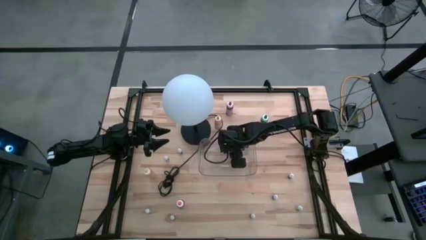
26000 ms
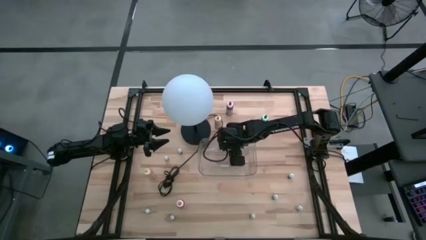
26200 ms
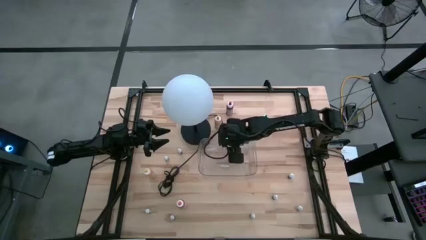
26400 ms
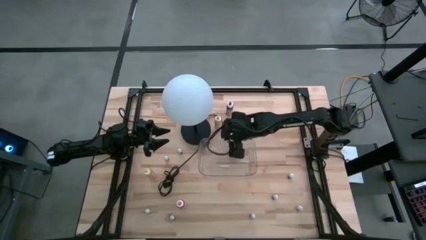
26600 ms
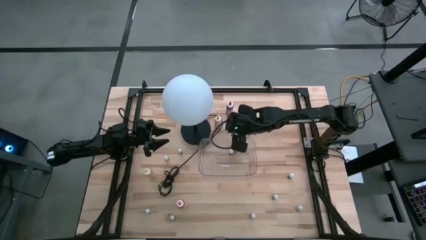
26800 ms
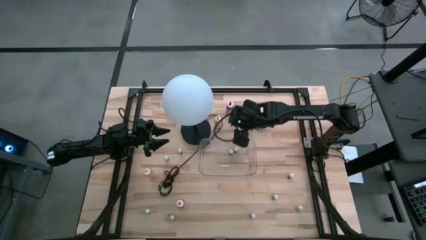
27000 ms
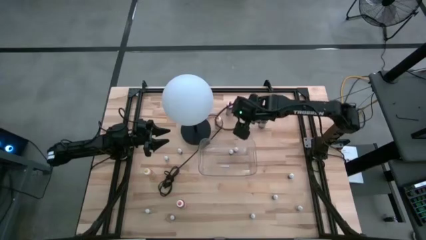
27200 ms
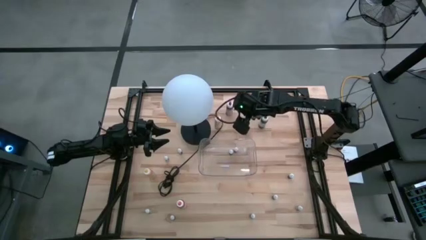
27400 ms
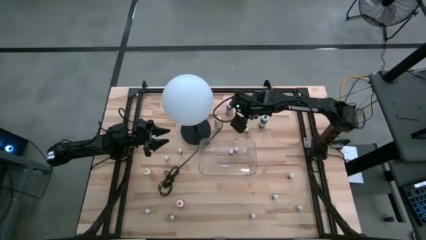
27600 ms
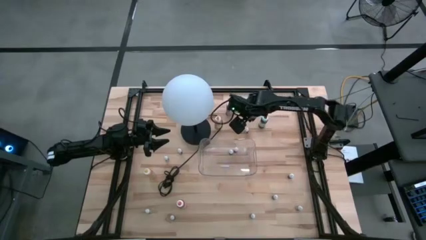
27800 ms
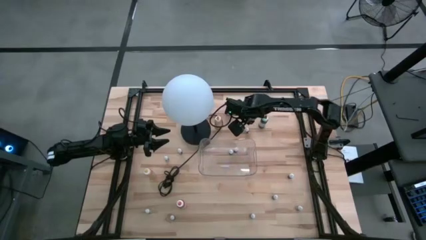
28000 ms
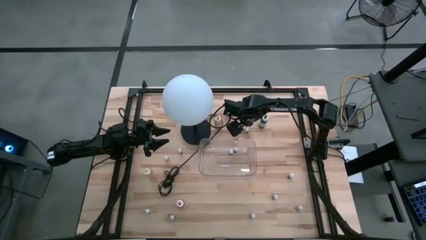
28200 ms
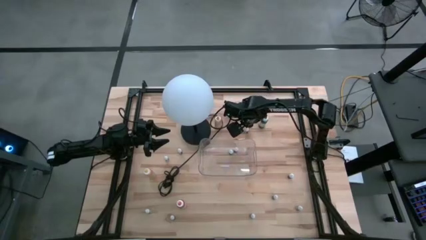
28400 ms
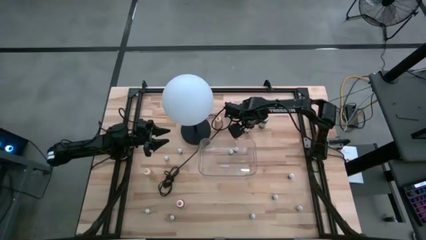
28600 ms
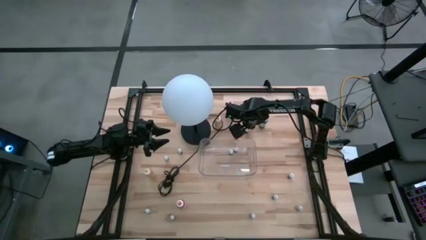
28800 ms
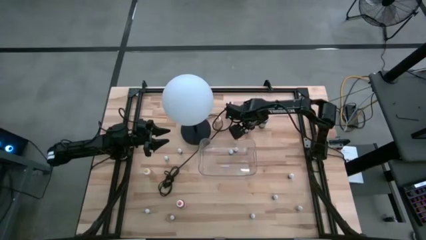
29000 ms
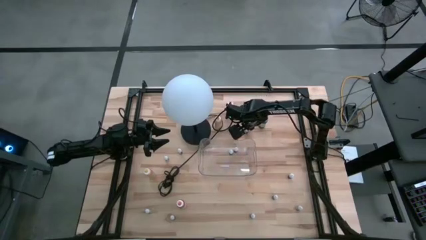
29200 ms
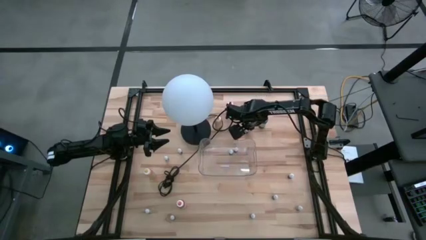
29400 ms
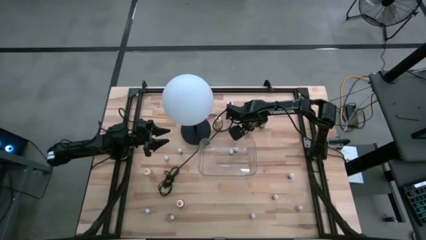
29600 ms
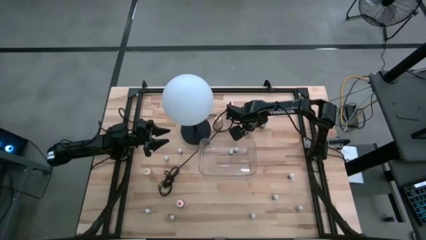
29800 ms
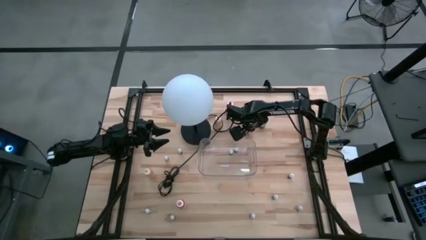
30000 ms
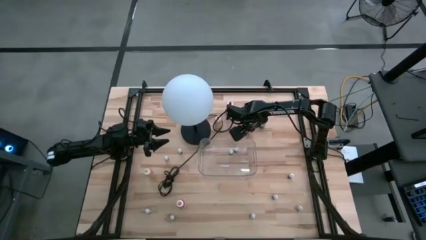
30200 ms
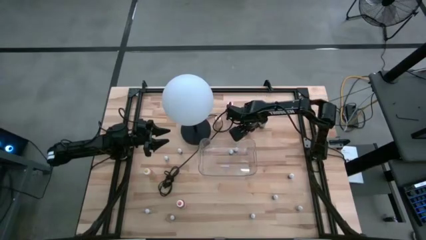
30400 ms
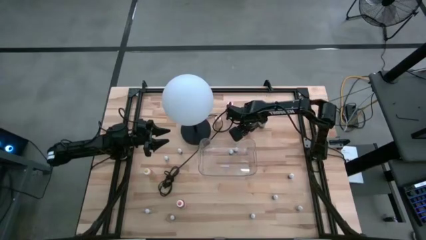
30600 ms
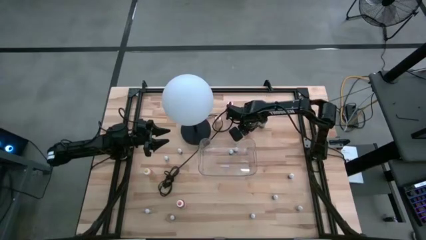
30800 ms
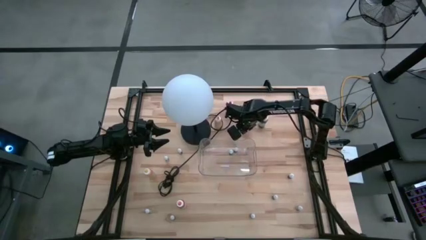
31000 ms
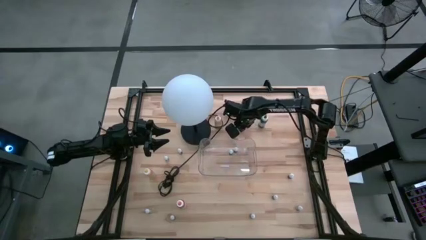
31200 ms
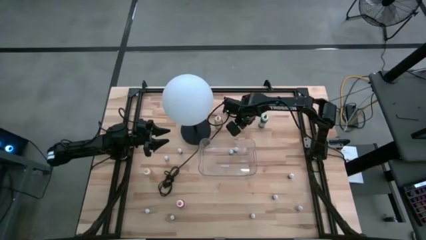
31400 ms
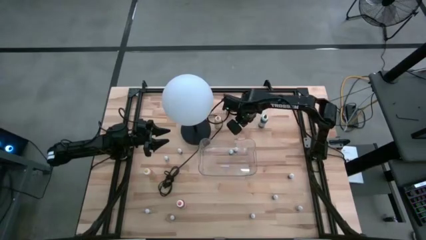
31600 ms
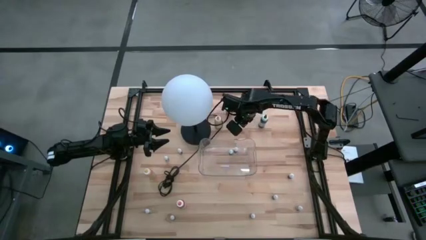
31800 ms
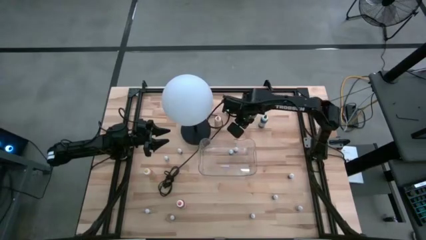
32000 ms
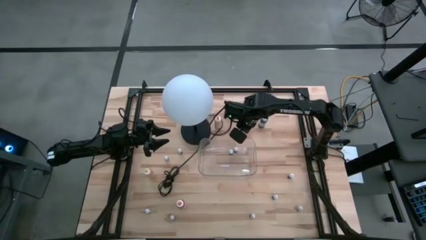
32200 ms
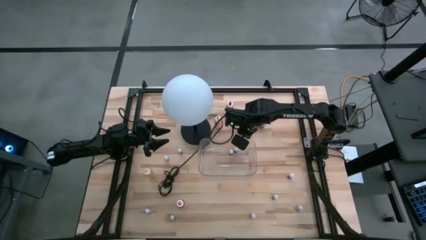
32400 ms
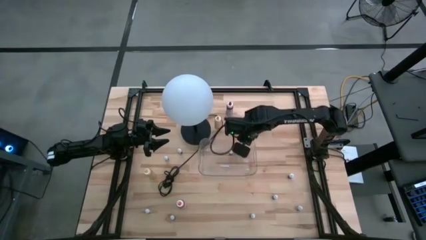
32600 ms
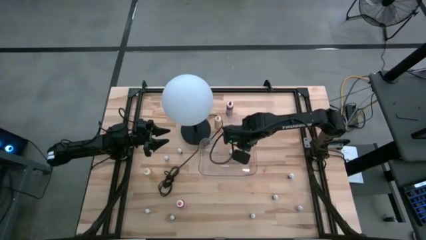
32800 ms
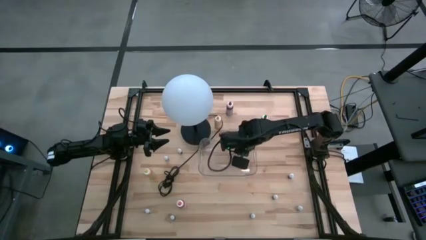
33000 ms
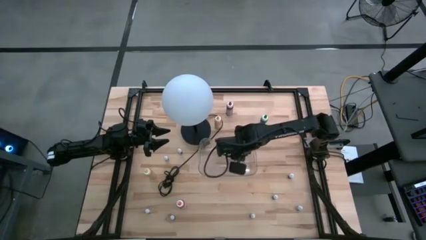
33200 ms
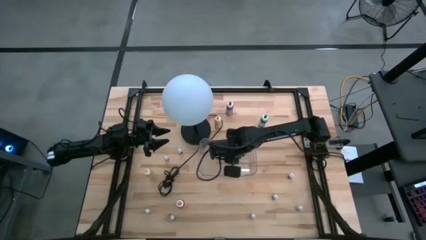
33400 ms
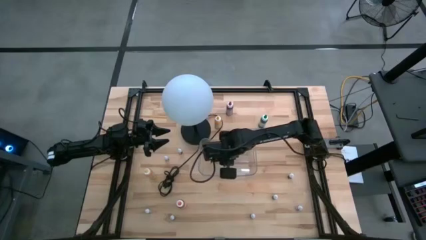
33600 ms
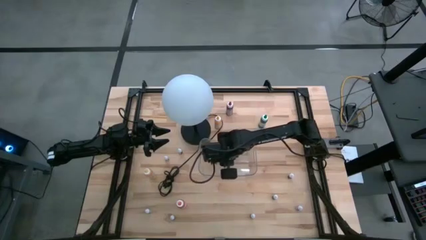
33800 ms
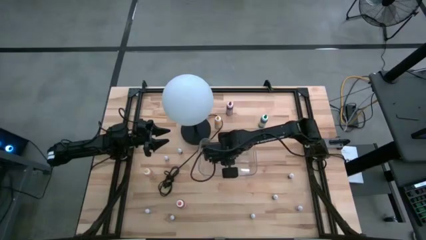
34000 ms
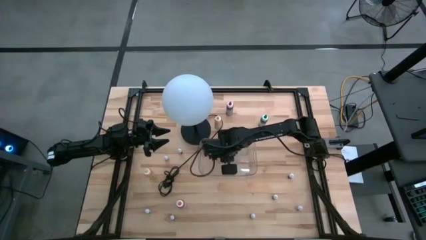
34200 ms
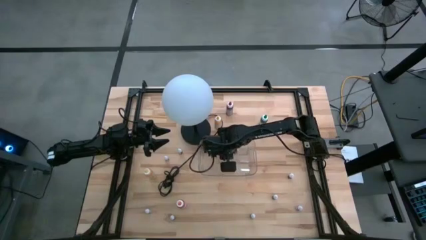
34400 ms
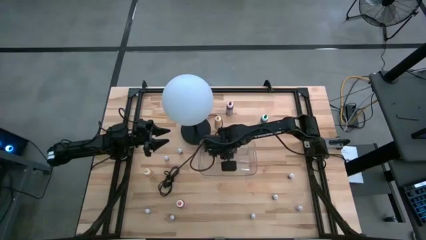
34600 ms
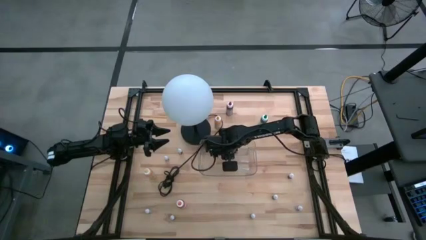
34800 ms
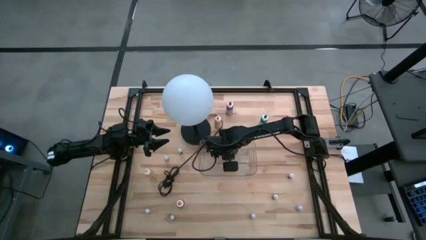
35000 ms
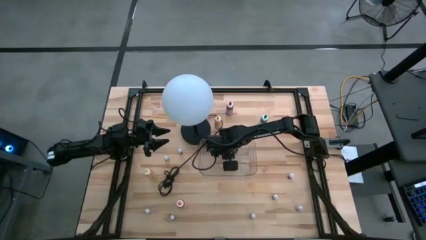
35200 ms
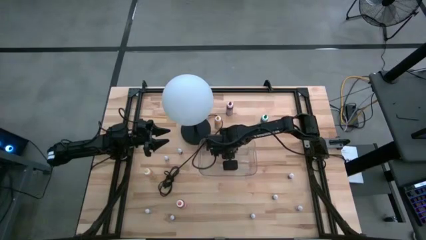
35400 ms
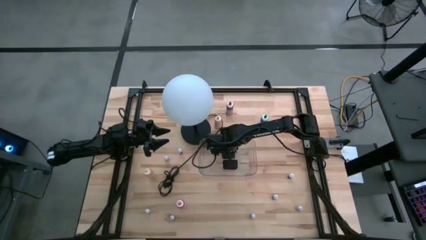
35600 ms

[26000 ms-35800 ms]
Task: Pick & Place food coloring
Put the small pink food coloring bottle into the transparent bin

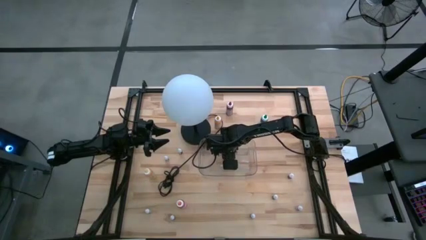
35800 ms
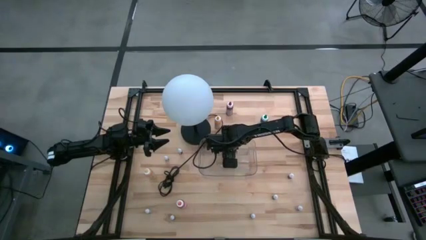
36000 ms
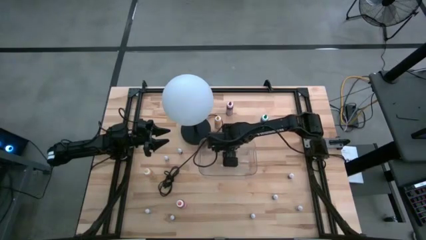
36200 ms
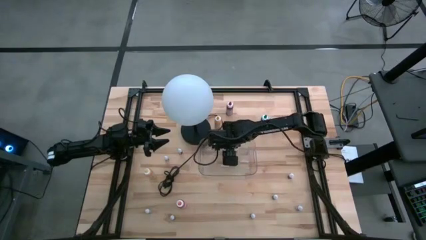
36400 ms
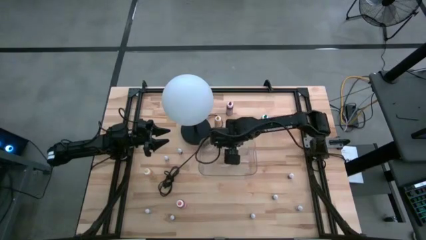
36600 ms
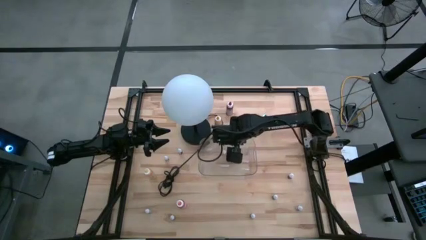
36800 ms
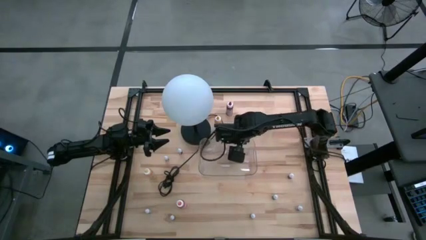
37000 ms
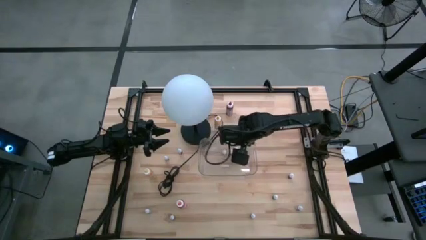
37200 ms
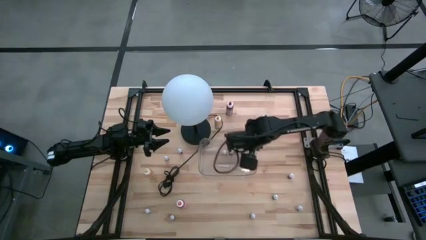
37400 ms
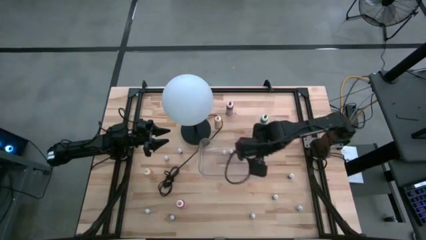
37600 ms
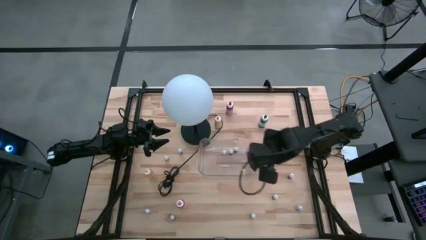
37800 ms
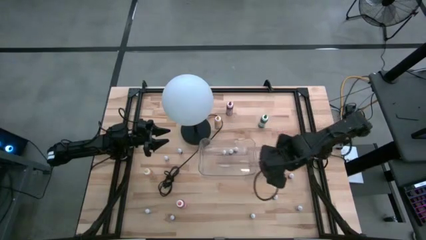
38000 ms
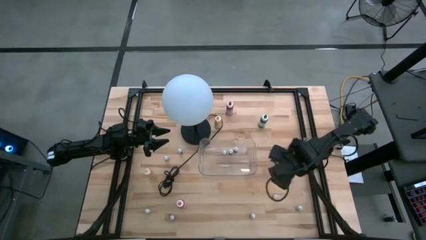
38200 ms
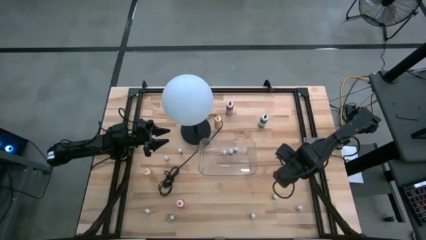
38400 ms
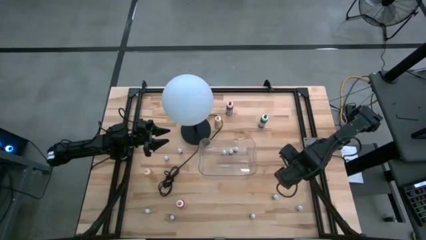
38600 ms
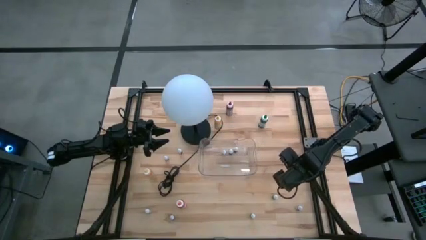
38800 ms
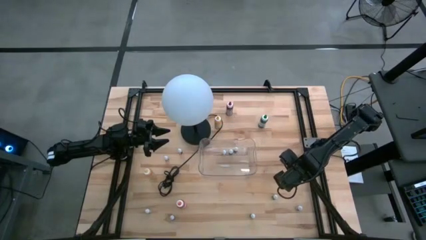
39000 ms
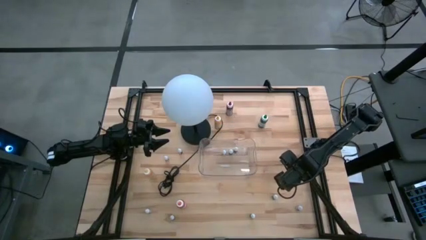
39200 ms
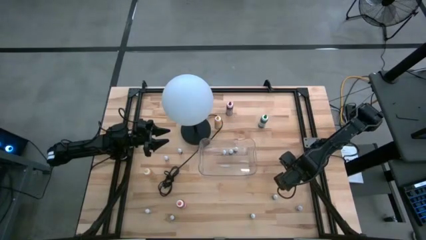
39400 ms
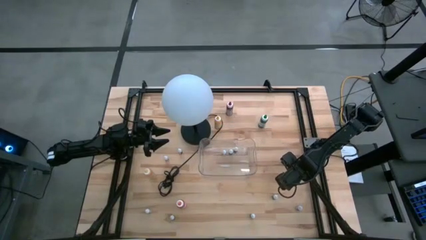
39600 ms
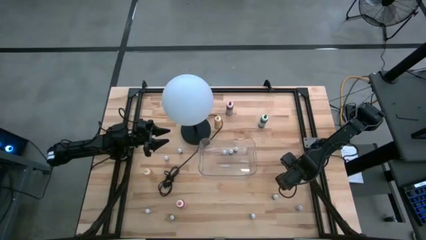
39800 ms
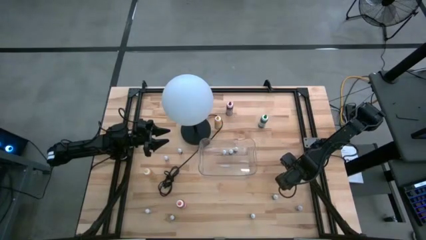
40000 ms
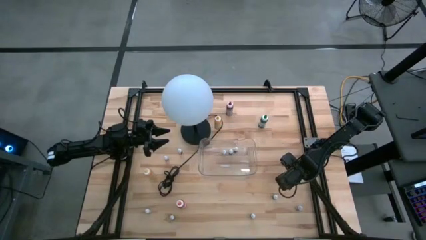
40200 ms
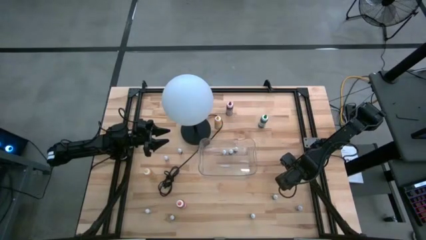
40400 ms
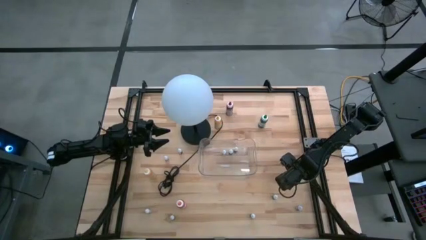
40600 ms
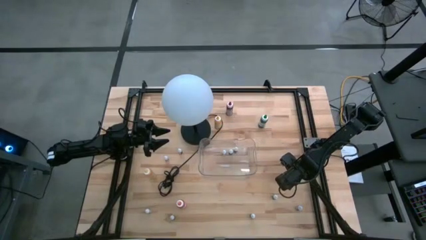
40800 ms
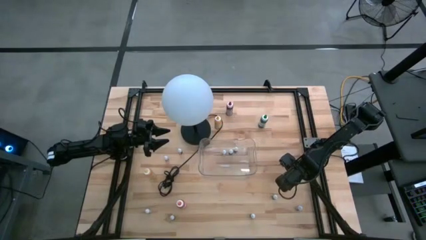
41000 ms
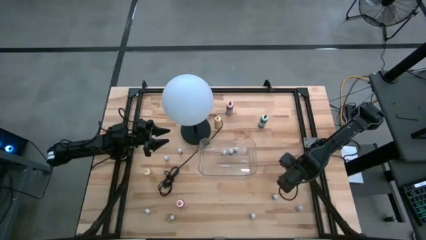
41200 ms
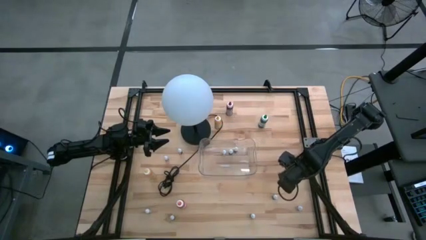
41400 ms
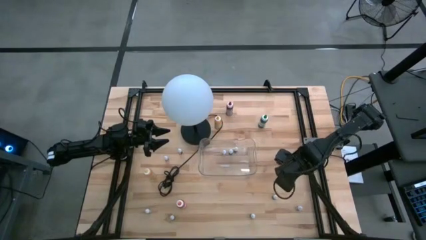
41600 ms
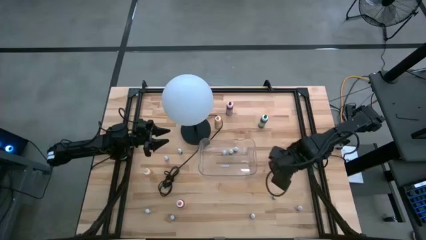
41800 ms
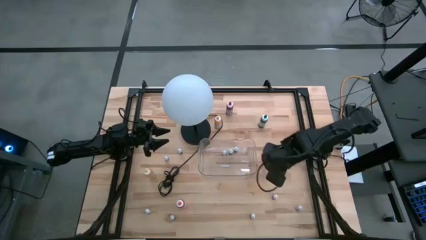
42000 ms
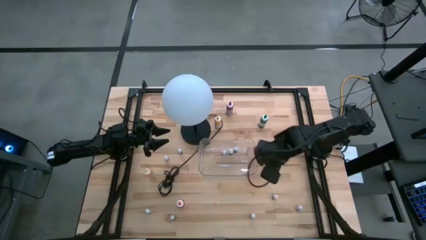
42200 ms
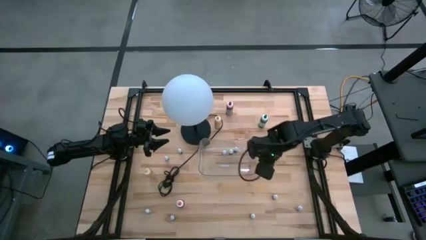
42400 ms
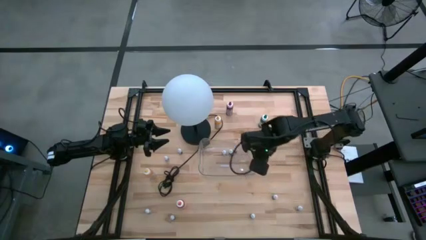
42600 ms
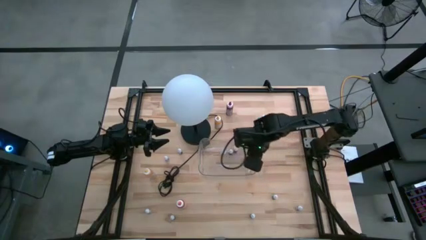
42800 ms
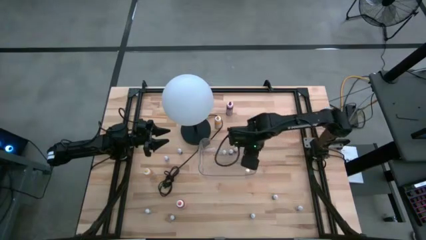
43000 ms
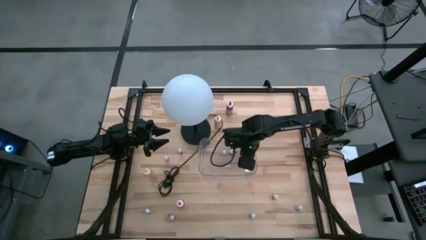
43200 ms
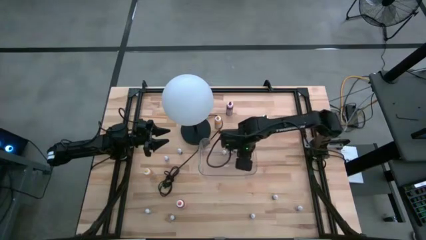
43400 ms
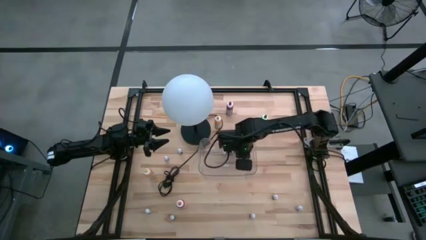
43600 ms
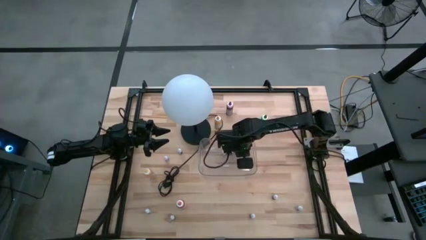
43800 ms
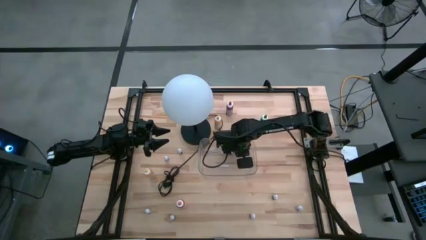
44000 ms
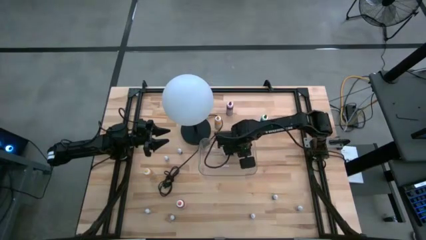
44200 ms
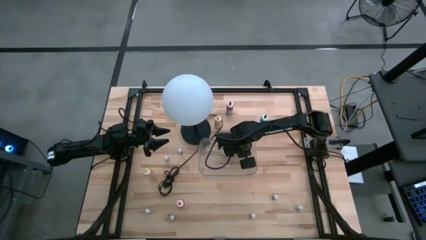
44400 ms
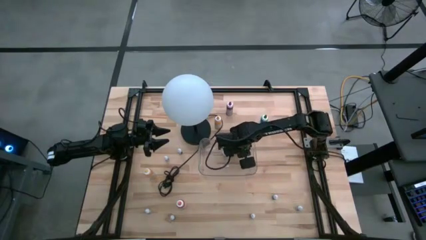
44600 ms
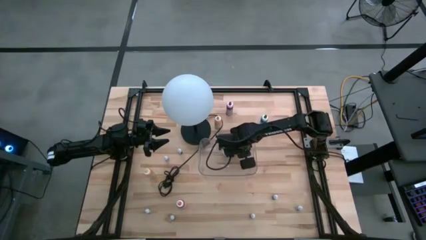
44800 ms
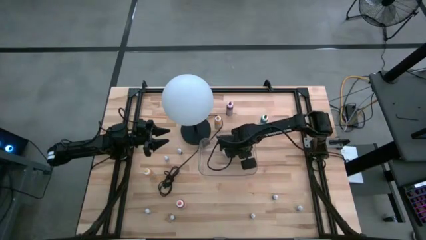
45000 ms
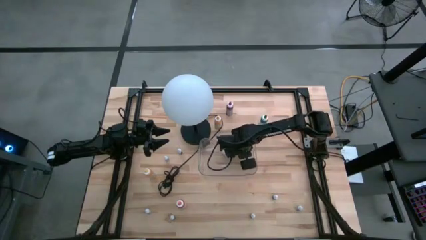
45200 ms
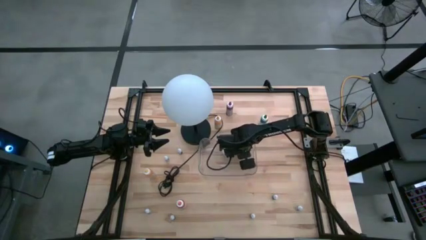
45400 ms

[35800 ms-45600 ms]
Put the small black food coloring bottle into the transparent bin
